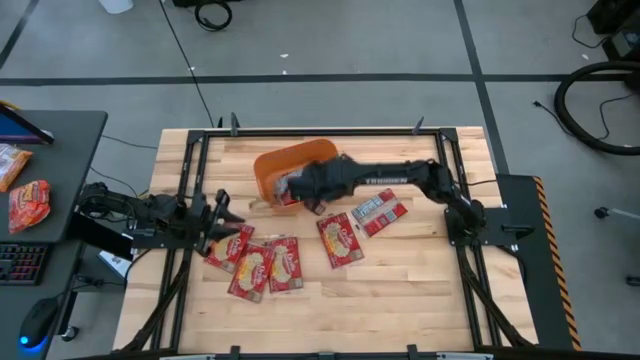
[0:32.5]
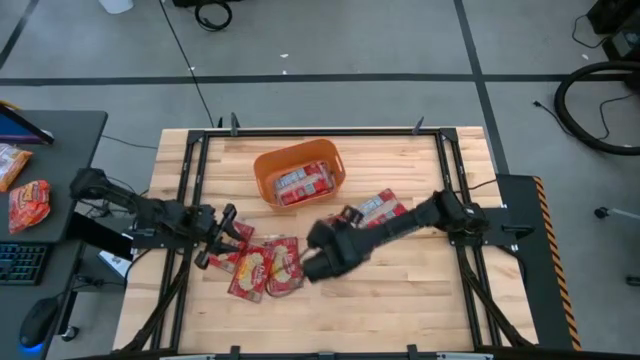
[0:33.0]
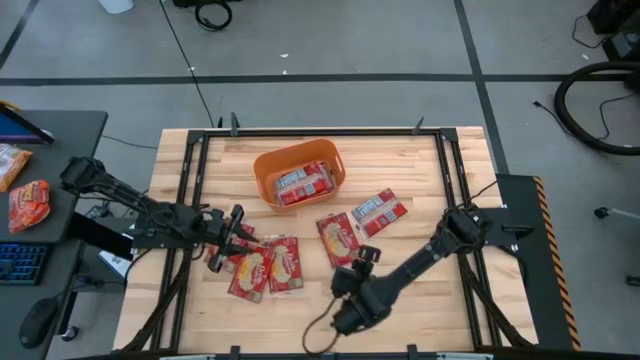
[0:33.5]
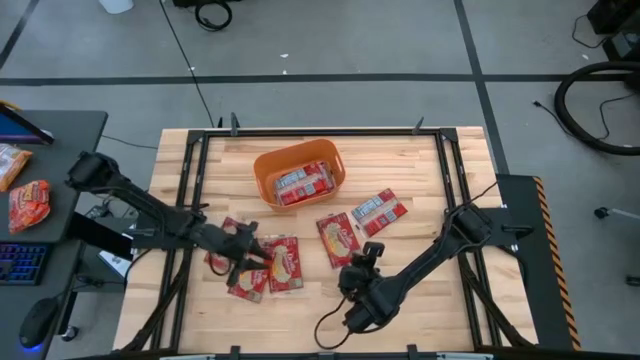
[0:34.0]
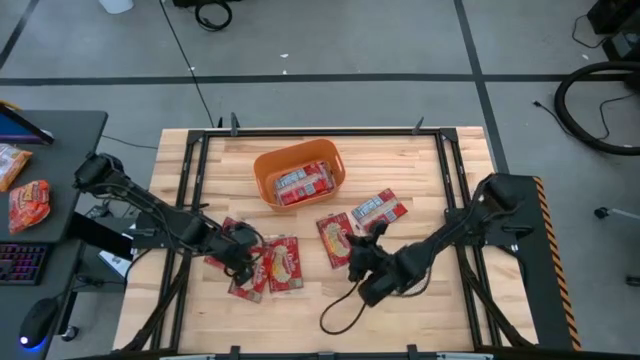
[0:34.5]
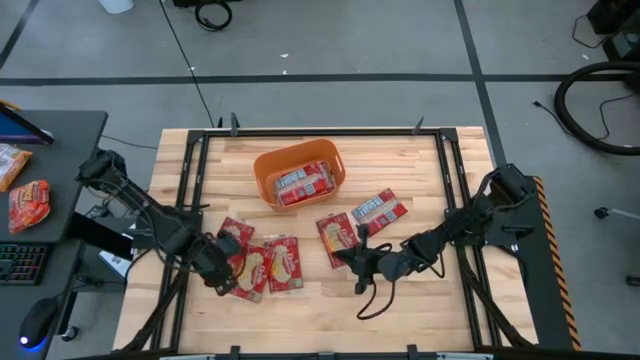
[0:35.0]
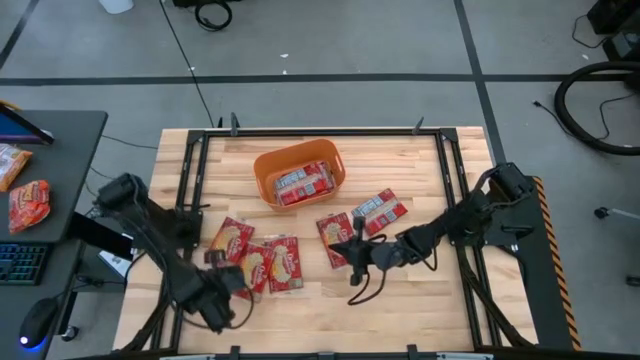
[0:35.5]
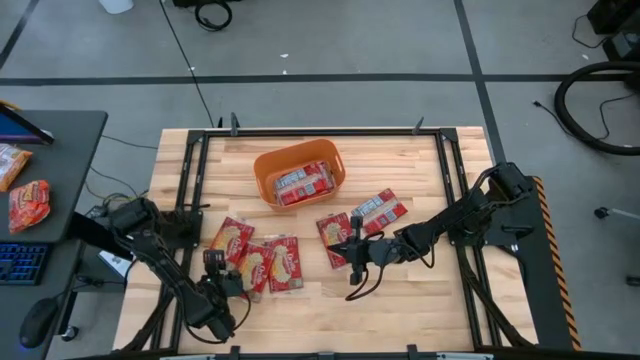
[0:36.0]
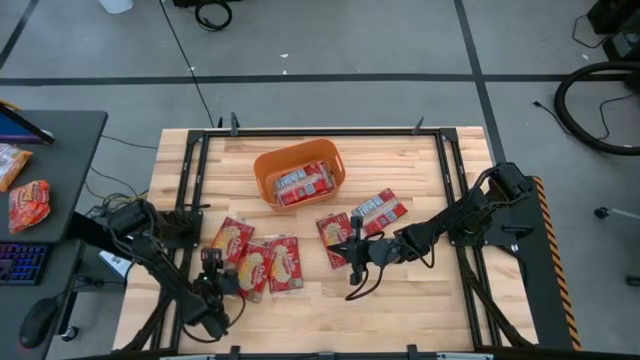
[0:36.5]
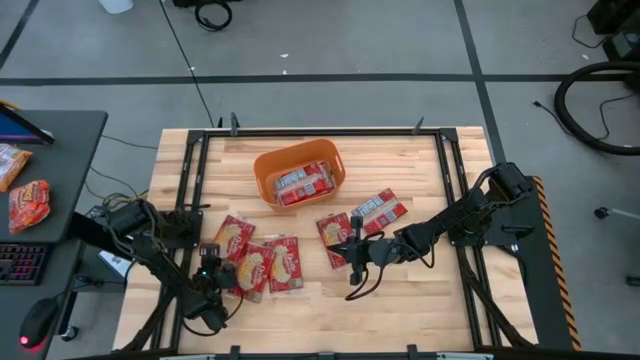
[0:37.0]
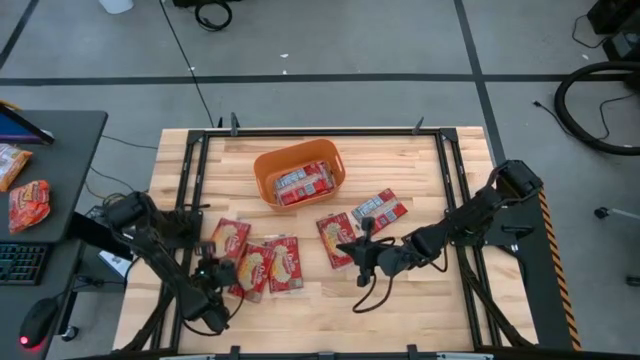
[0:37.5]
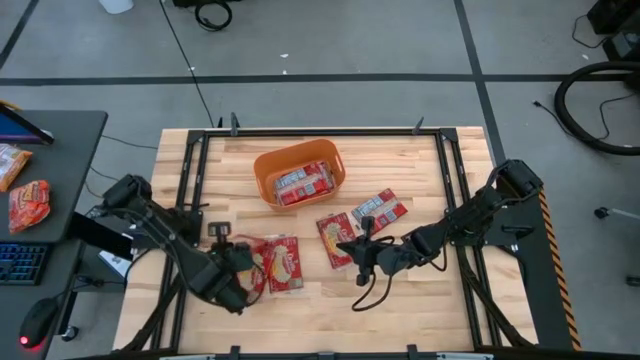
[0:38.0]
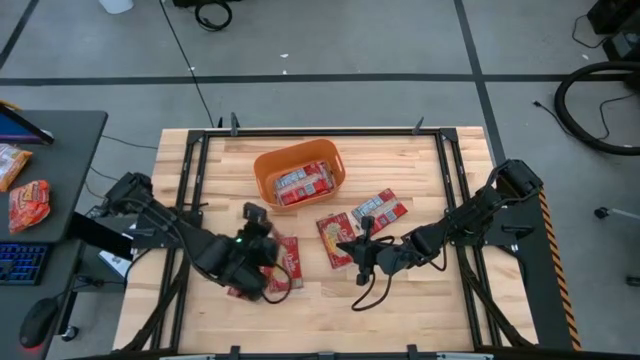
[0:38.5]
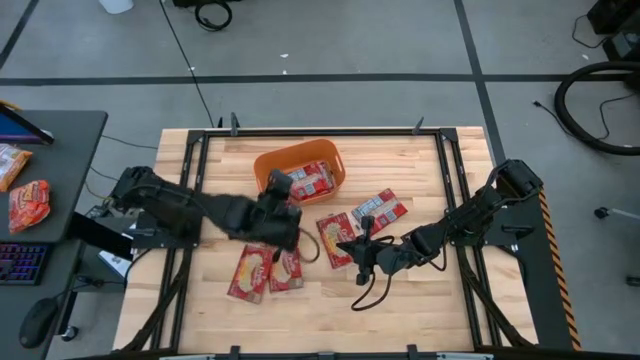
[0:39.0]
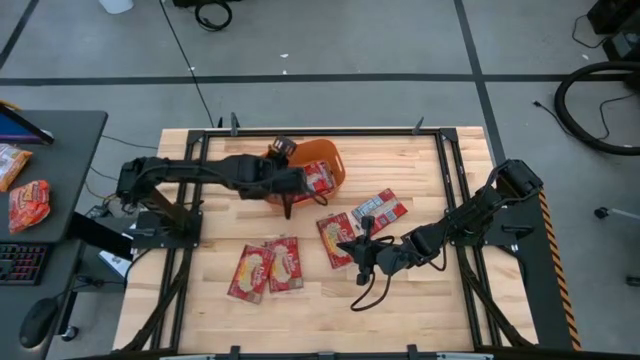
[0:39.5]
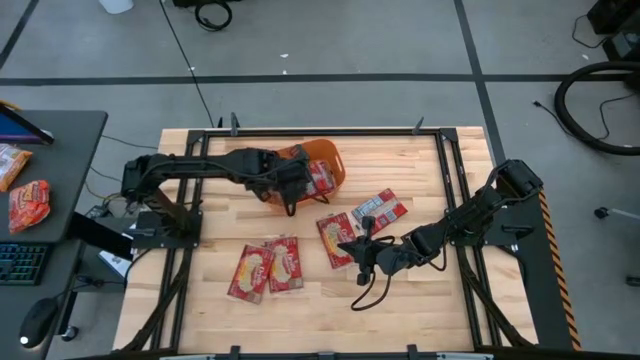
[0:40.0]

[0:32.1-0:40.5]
Task: Sort popcorn bags into baskets
Put the popcorn bag into the orange bin

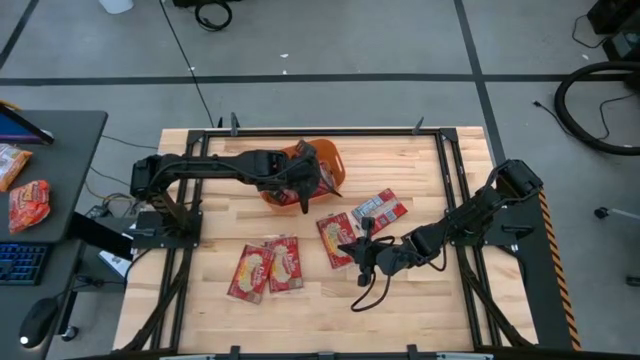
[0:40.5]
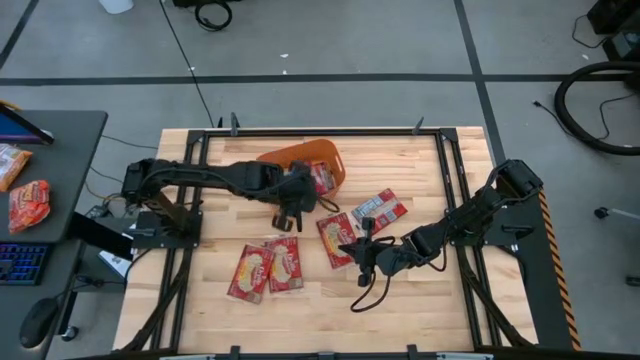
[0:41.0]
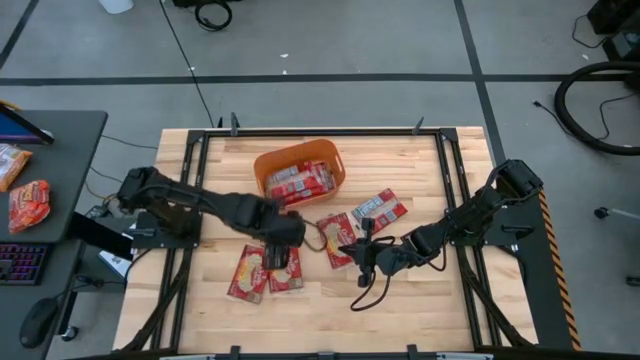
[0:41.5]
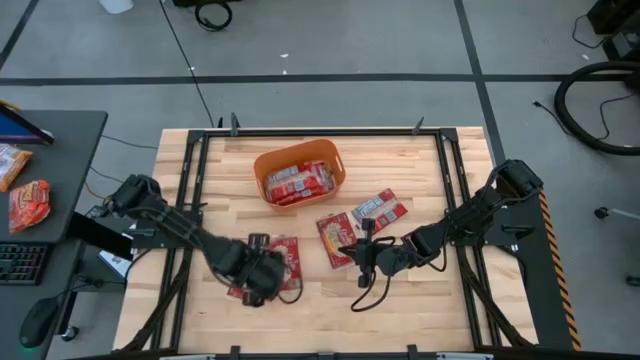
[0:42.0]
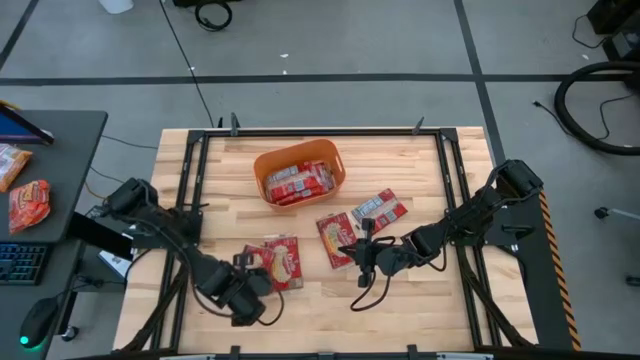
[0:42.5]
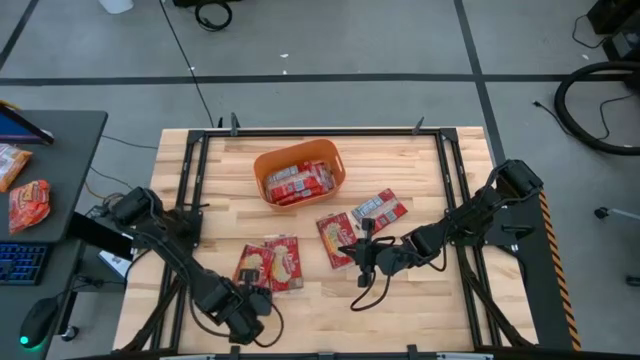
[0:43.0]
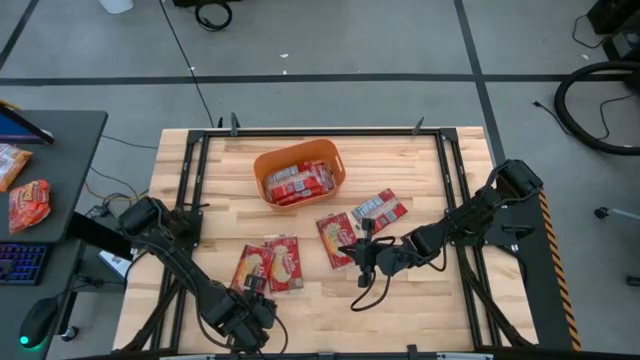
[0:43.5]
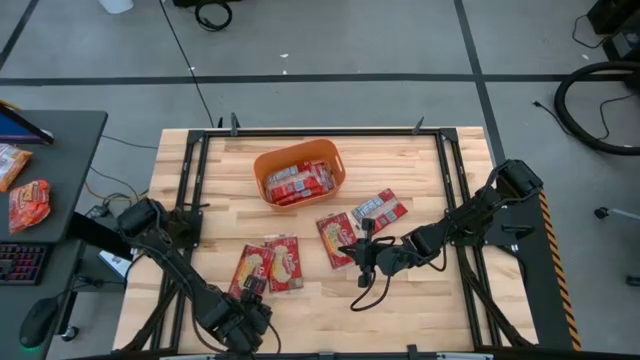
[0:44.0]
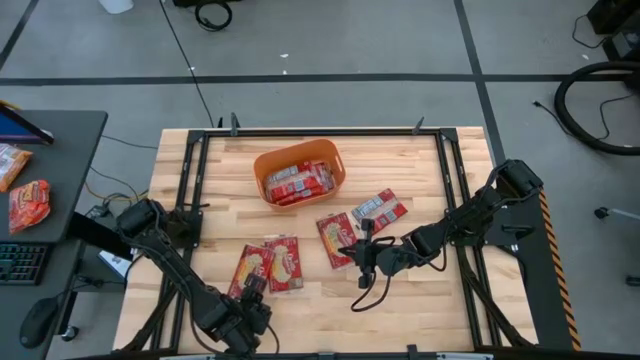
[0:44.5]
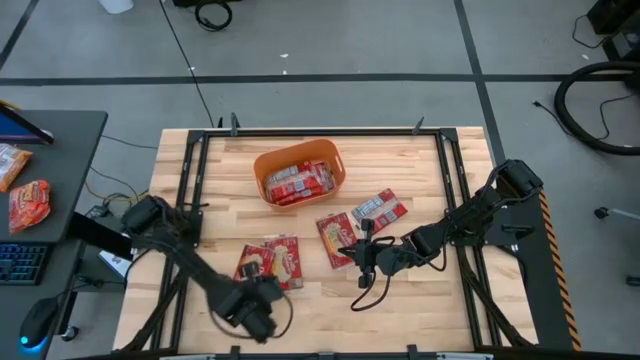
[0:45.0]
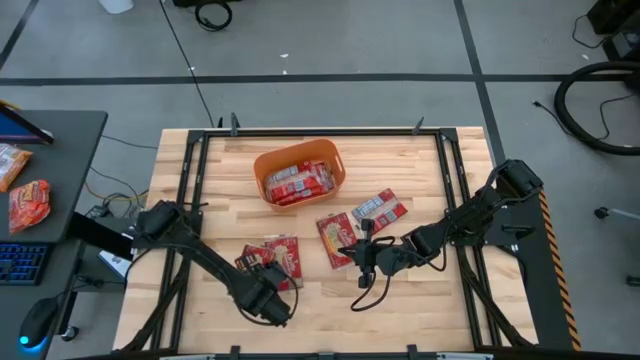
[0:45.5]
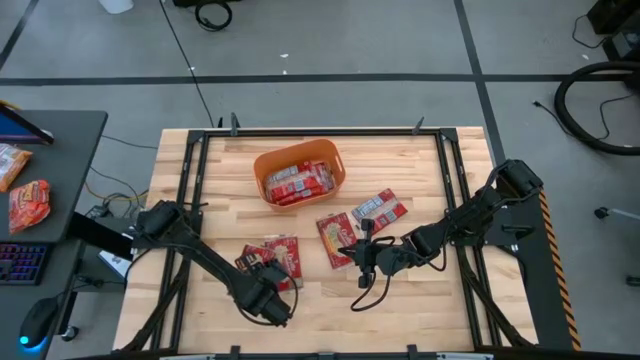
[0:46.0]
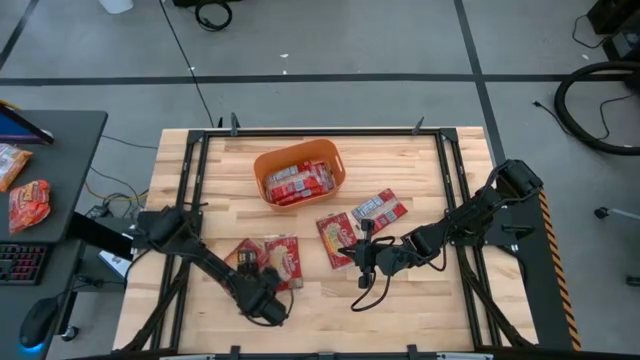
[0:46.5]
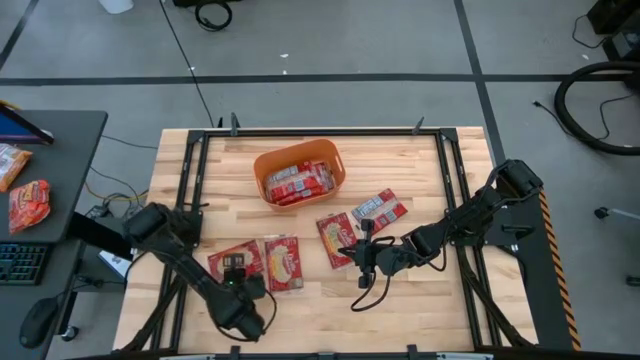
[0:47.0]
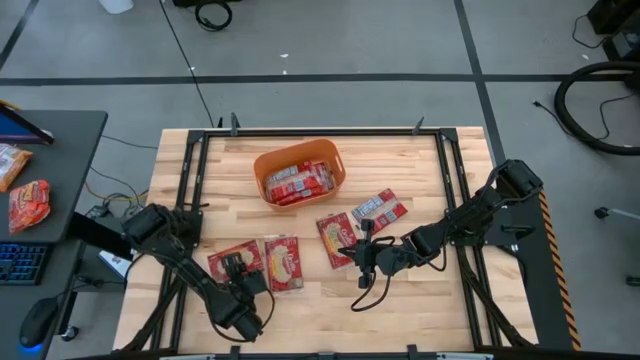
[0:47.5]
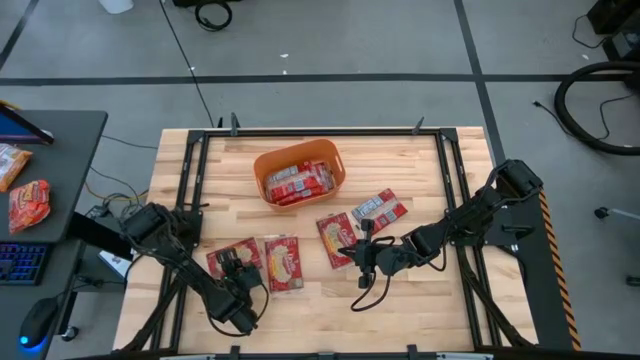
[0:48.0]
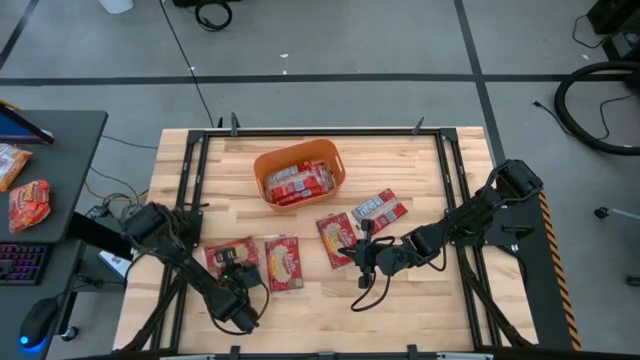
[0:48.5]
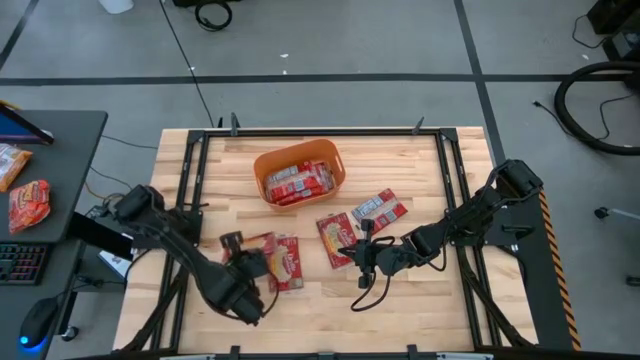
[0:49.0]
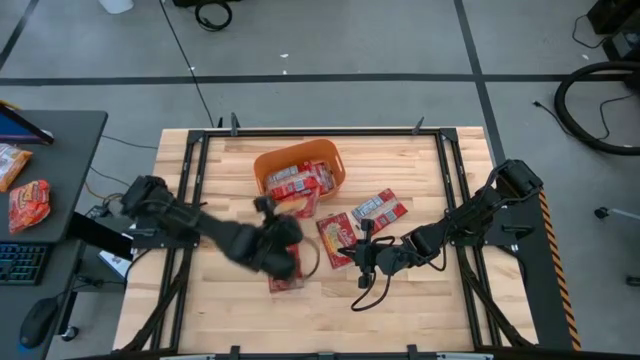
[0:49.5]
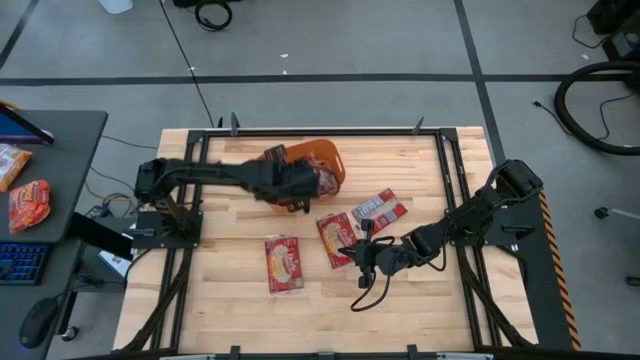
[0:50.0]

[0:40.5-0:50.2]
Put the popcorn bag into the orange bin

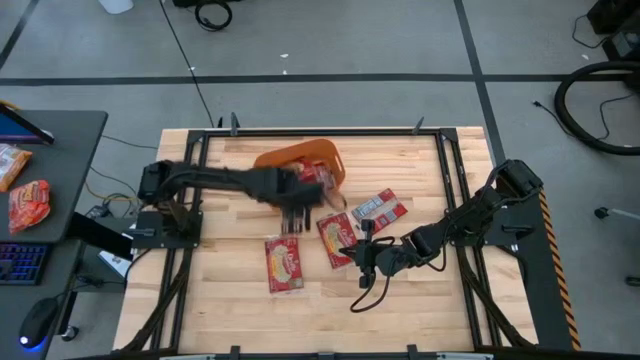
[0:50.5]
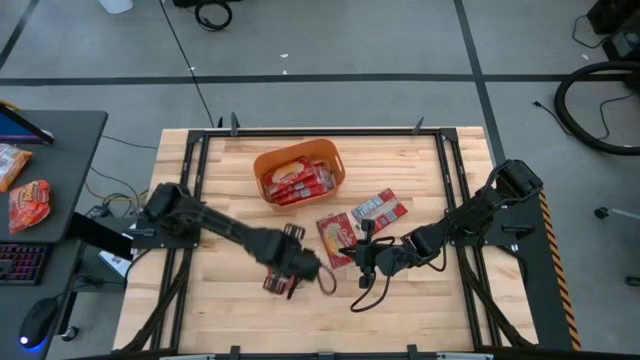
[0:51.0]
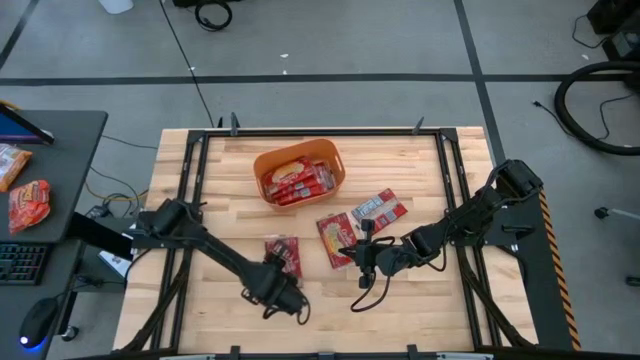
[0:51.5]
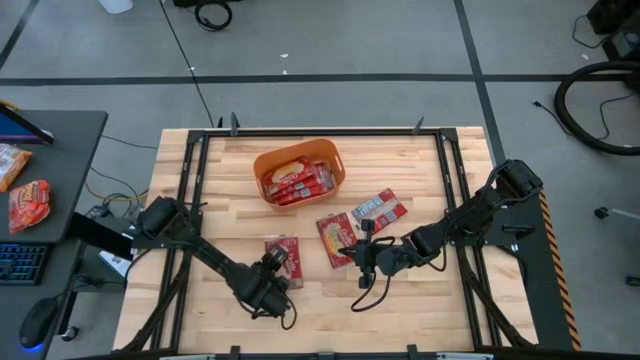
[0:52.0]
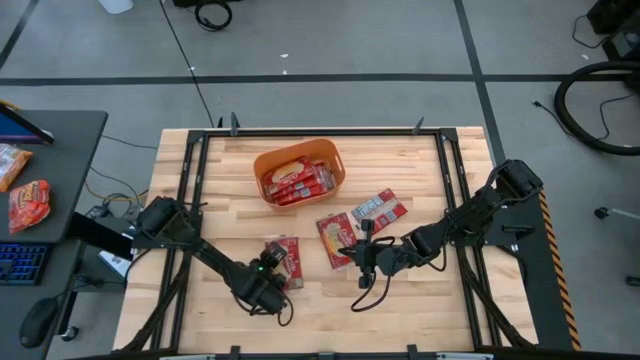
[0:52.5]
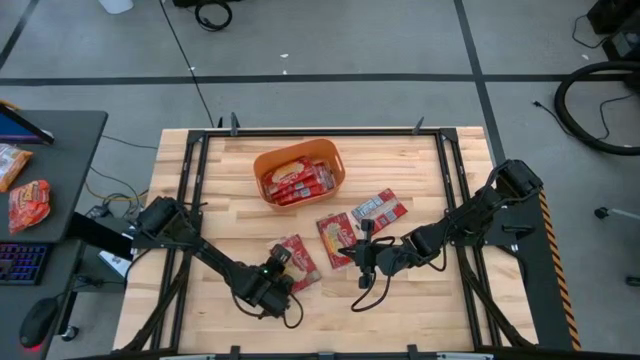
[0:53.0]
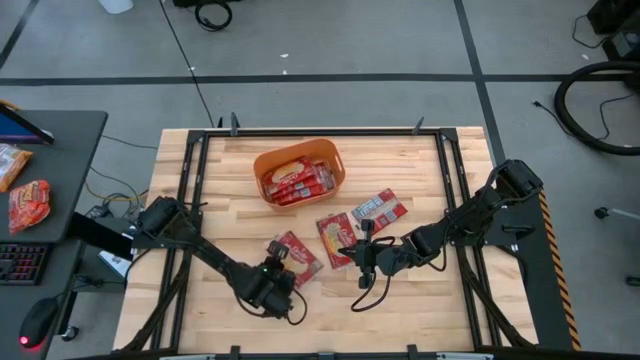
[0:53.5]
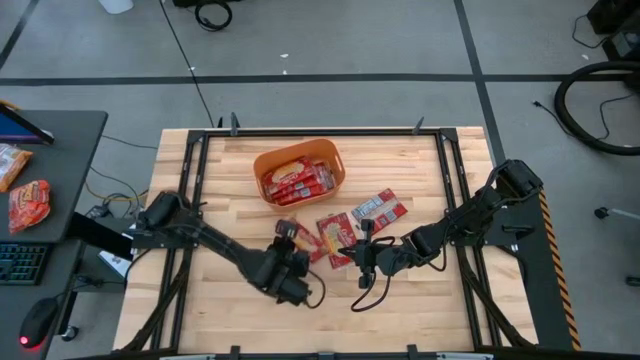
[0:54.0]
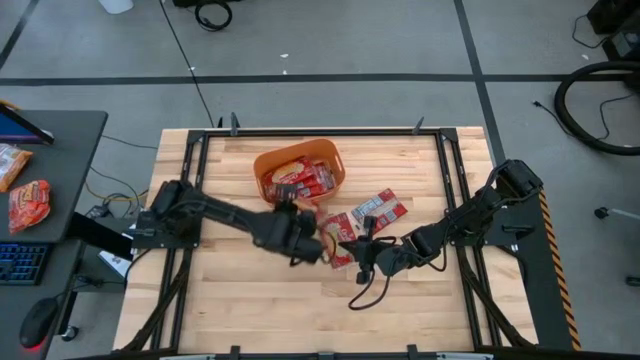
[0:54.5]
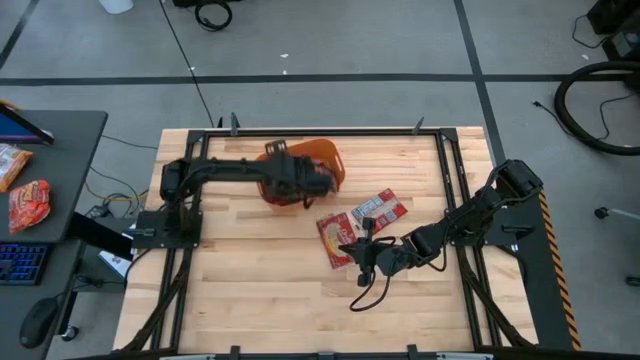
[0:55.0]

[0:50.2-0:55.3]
Put the popcorn bag into the orange bin
